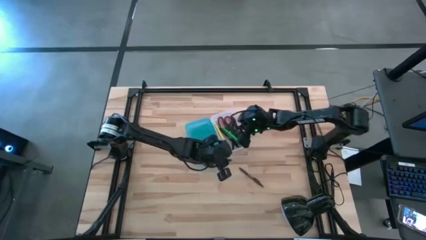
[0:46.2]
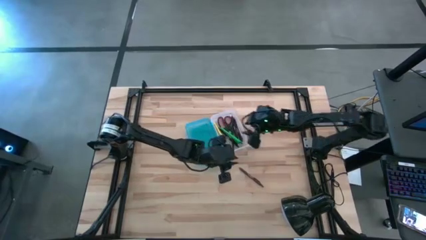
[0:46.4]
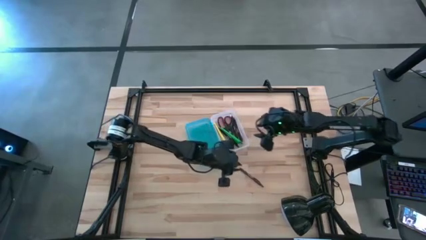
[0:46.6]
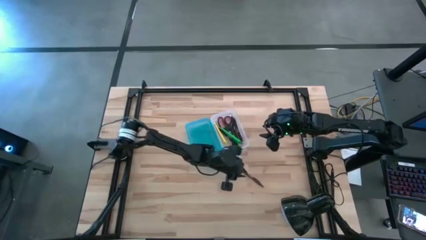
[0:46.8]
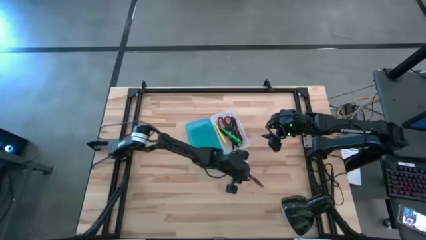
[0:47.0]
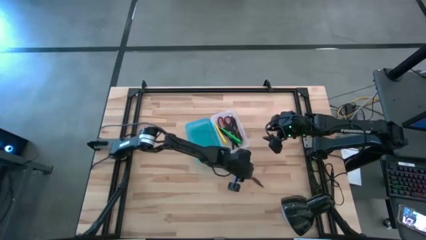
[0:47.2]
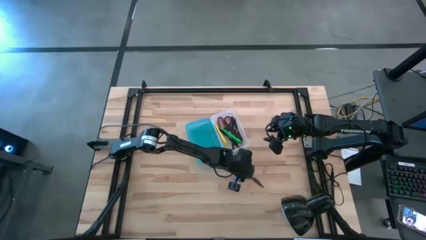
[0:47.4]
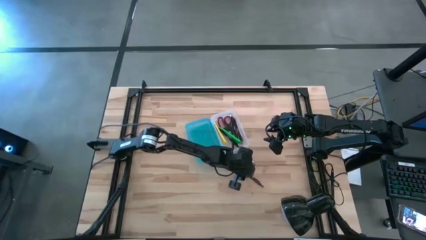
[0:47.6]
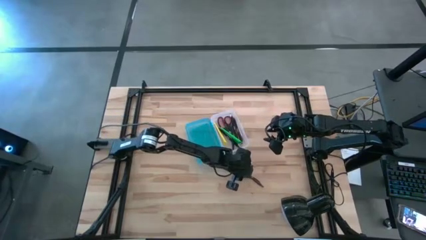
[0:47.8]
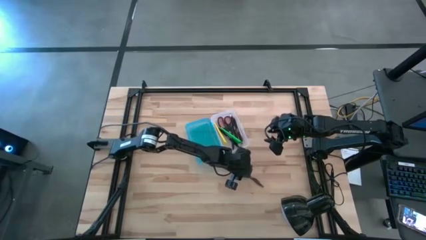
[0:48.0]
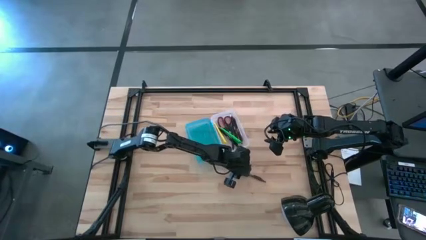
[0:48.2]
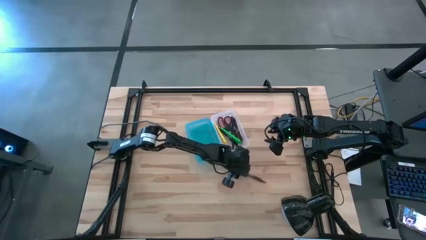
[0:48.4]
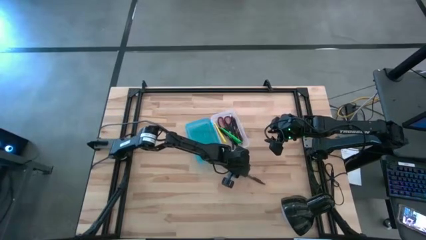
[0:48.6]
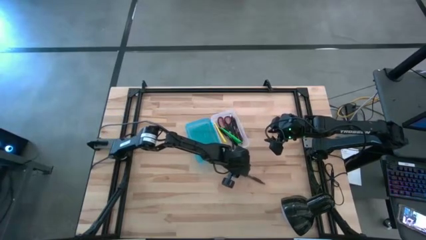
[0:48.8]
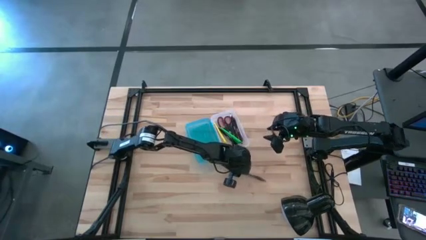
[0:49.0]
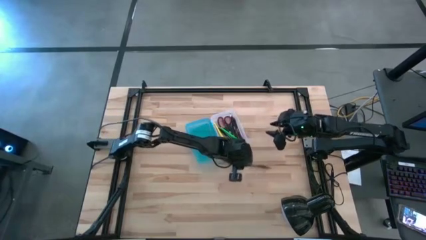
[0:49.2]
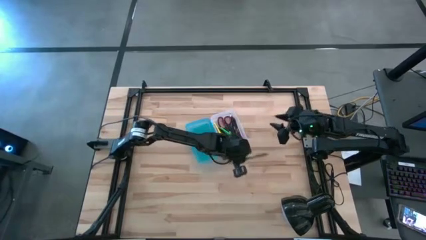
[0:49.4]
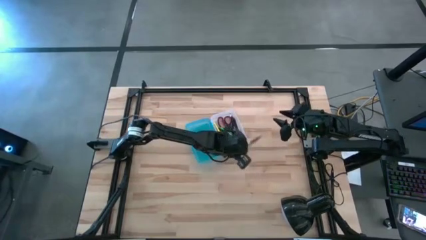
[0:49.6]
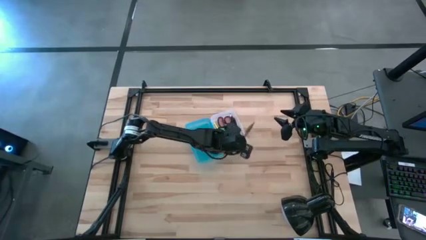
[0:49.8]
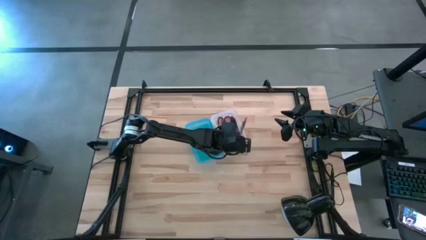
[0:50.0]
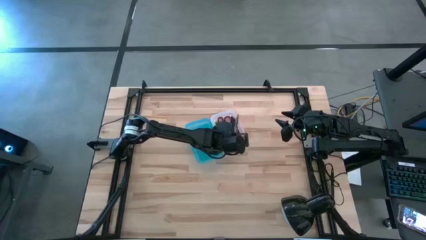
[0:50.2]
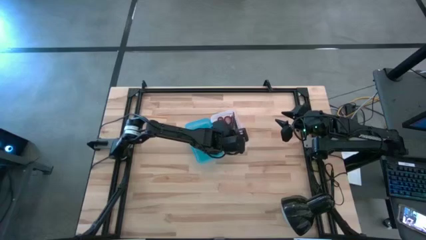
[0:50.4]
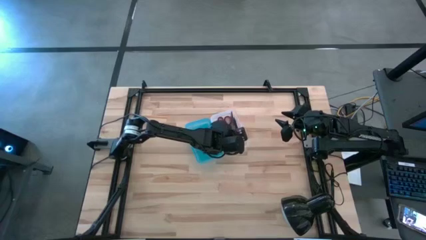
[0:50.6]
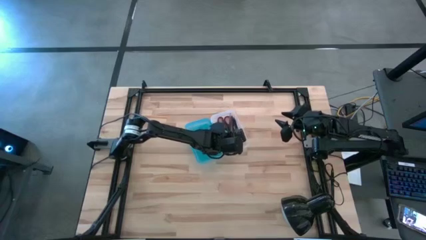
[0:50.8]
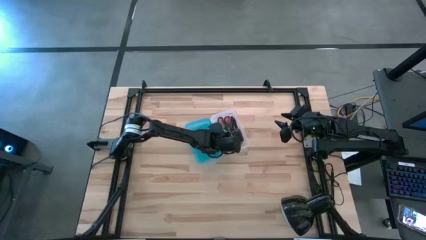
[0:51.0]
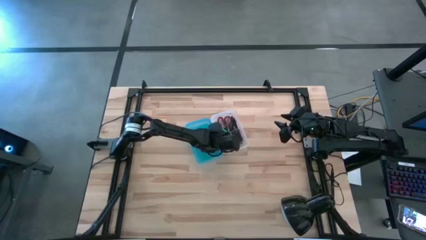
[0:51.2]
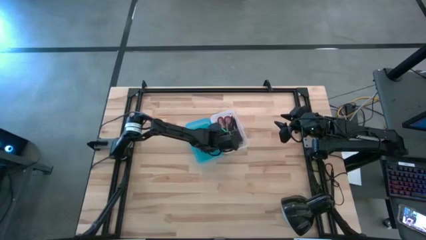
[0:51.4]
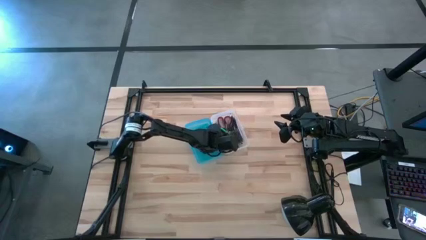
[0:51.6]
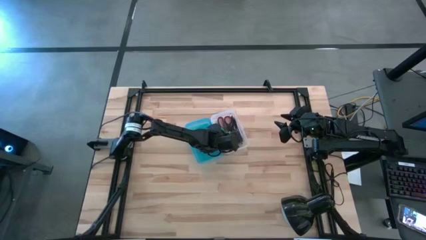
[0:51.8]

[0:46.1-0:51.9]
Task: Pick & place school supplies into a supply box
Put the brown pen into the blue supply box

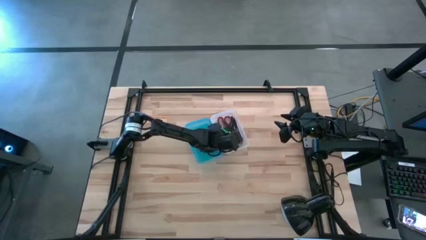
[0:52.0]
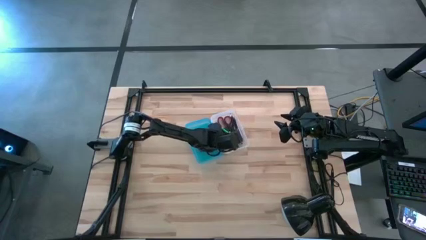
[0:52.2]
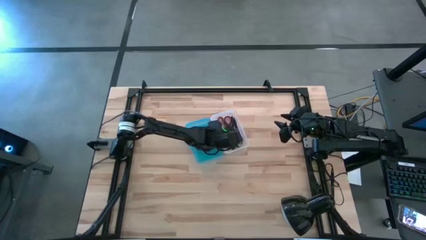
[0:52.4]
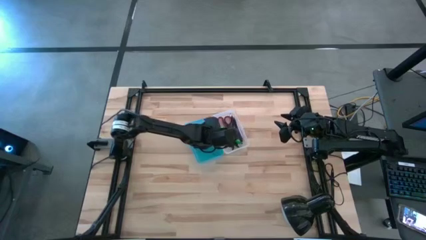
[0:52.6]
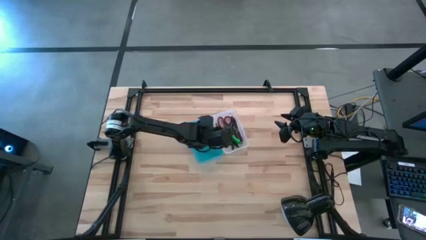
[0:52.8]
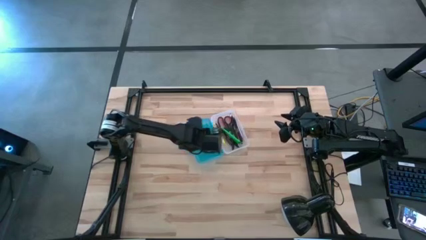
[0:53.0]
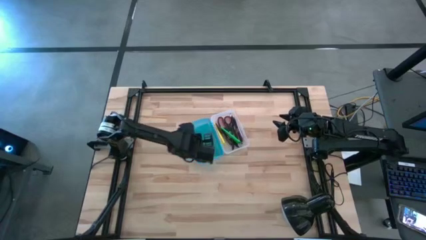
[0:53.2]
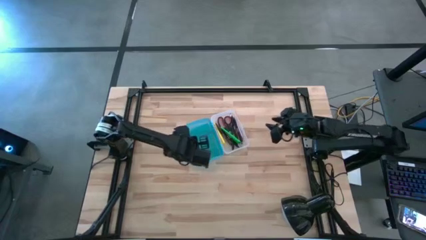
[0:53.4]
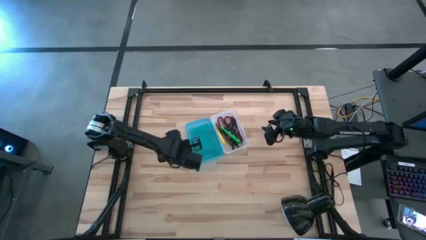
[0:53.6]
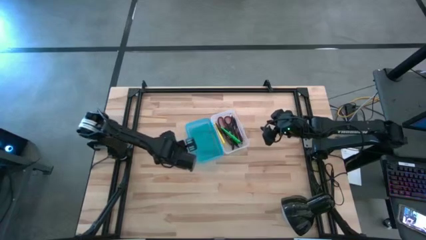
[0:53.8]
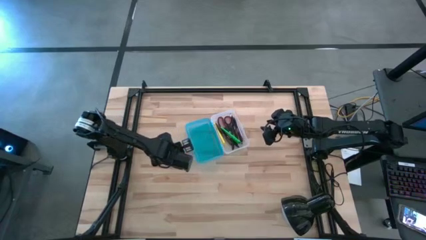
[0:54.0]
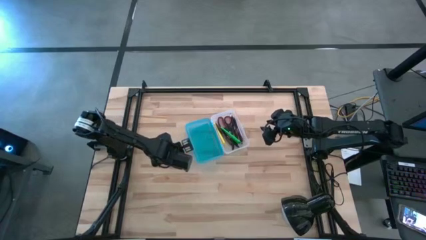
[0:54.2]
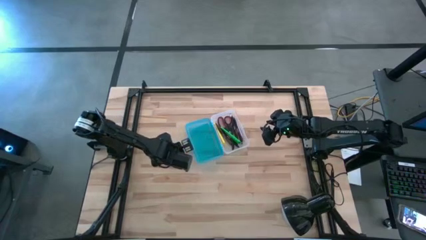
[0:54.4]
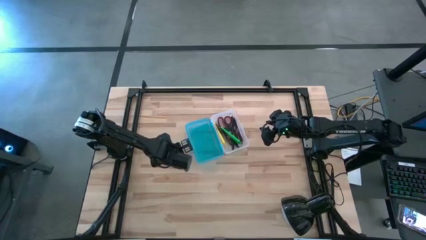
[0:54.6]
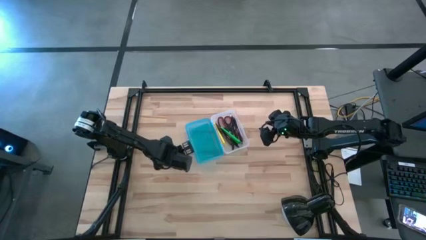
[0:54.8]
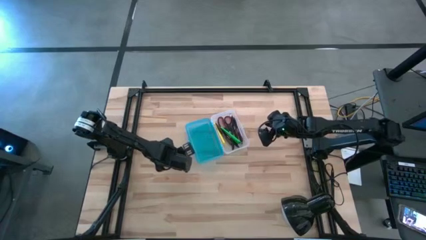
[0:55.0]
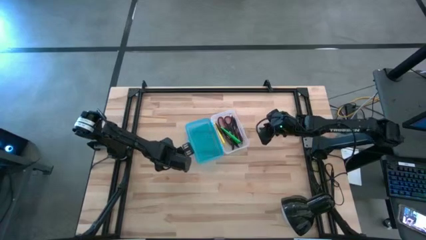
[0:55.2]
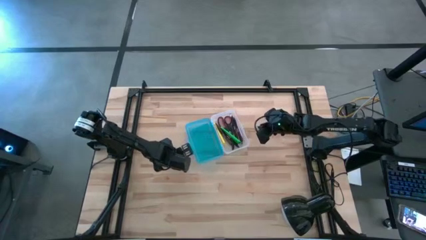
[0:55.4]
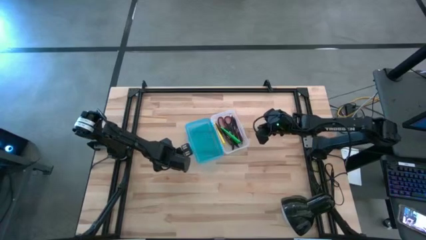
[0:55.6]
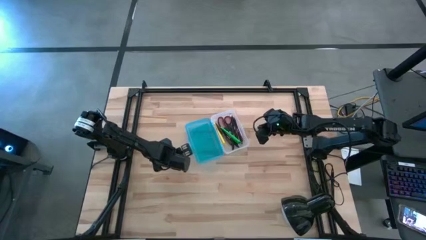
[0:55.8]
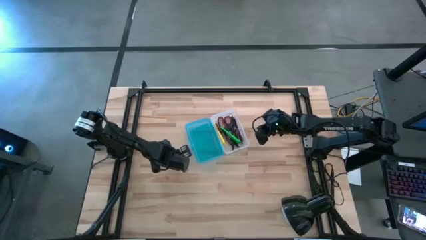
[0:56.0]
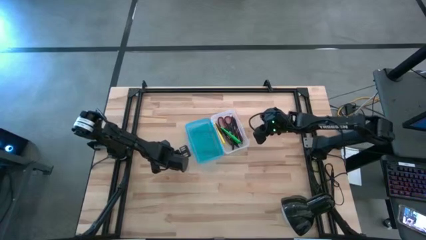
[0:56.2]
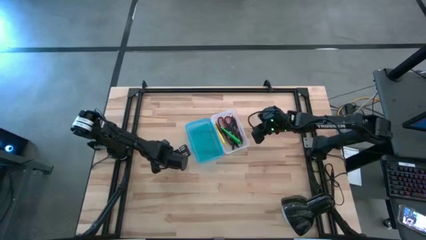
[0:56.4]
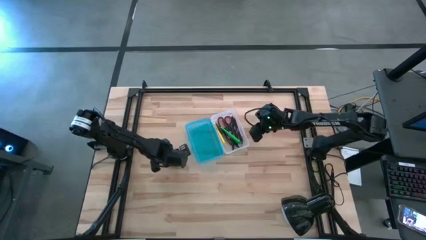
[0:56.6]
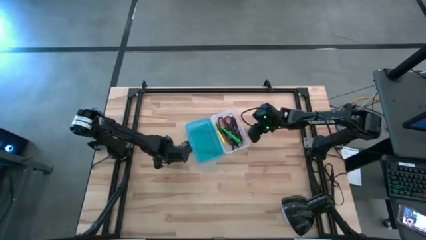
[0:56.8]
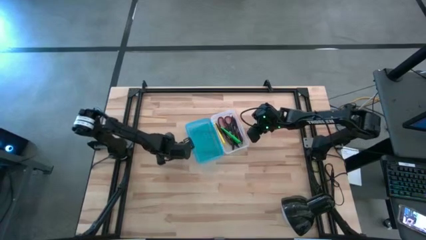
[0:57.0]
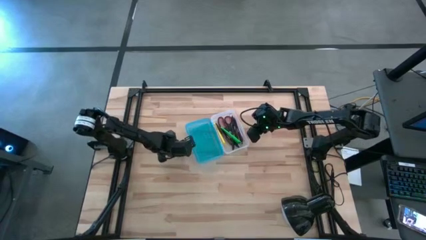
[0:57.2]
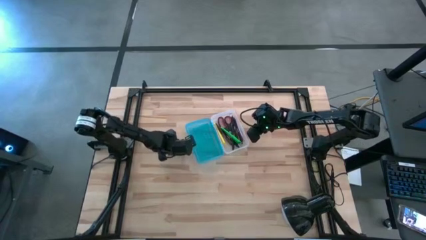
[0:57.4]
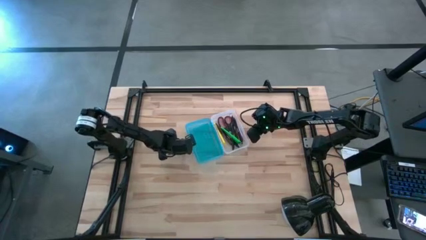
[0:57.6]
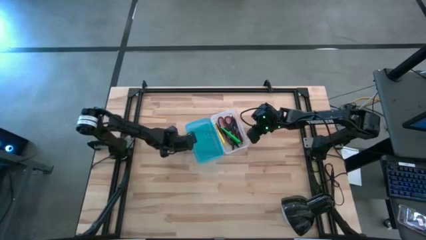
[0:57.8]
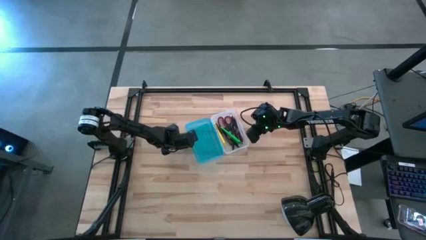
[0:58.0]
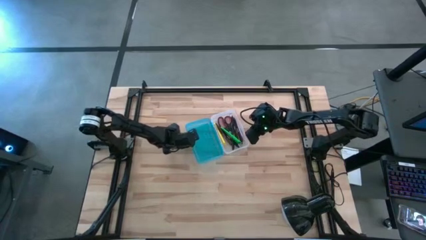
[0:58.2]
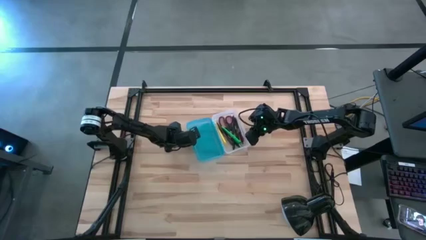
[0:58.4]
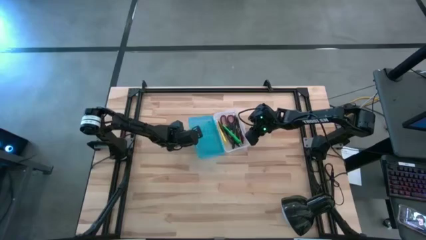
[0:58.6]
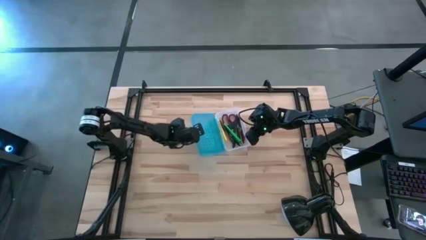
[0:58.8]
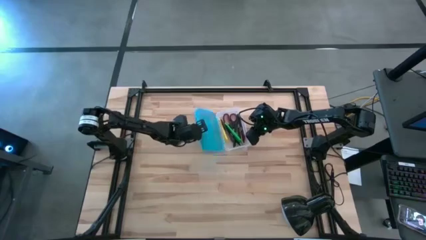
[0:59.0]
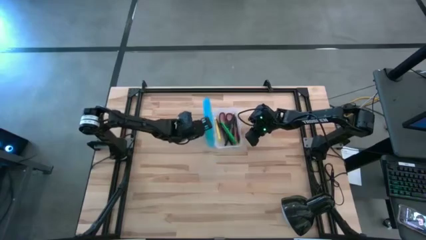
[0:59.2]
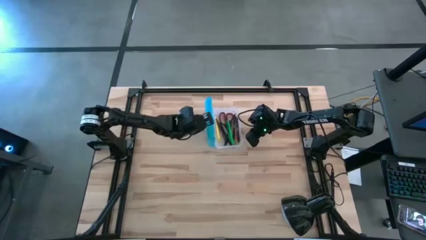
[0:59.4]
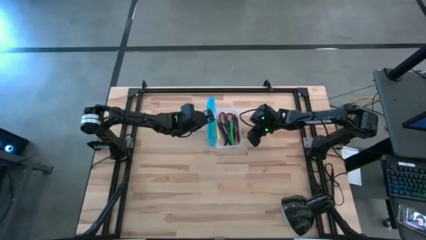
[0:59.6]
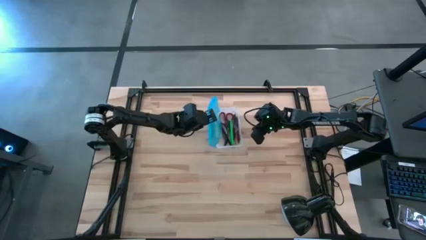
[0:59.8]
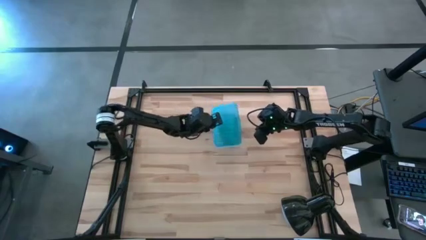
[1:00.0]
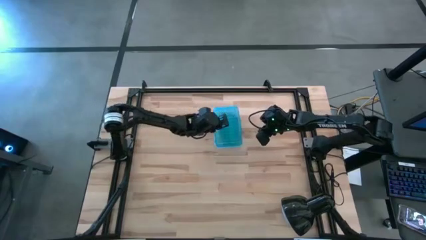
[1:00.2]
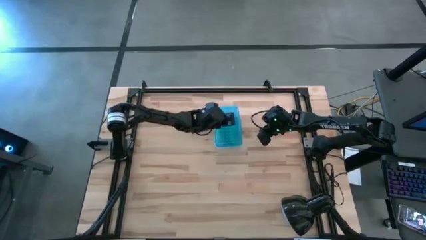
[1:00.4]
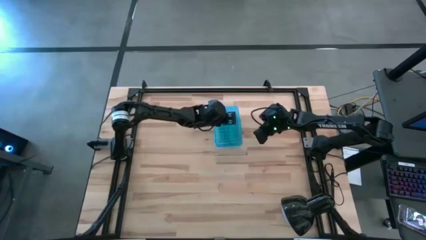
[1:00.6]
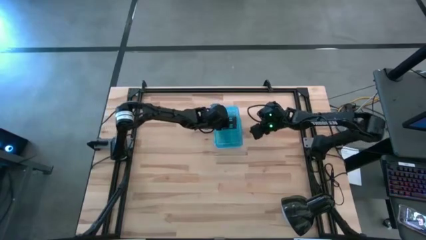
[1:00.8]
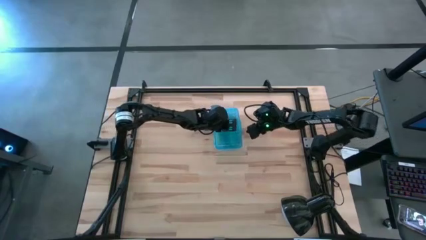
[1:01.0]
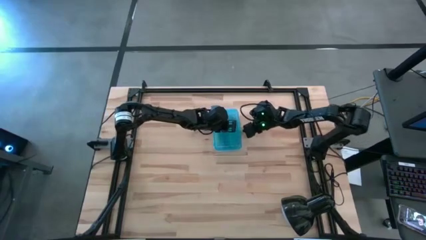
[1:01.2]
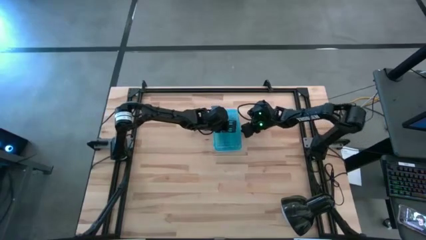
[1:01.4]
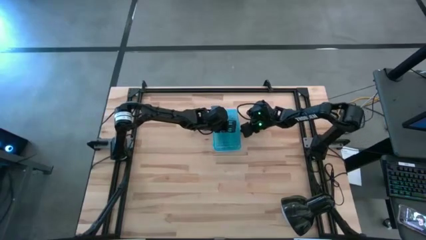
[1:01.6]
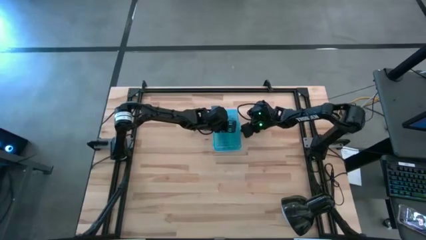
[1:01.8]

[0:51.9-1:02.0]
Close the blue supply box

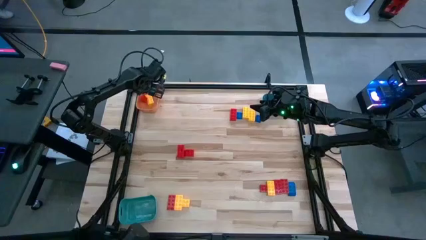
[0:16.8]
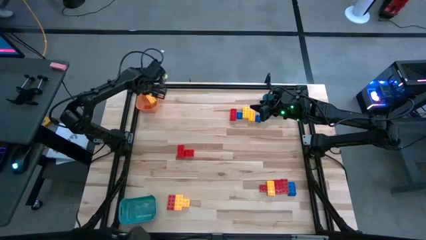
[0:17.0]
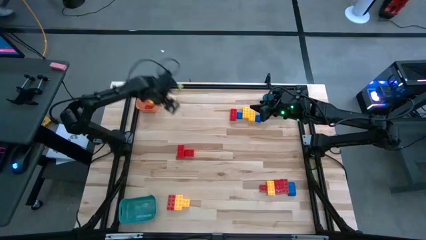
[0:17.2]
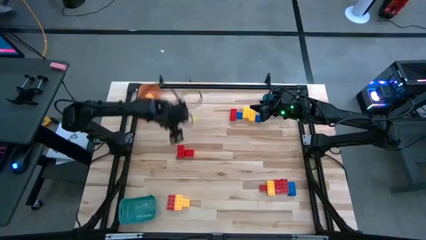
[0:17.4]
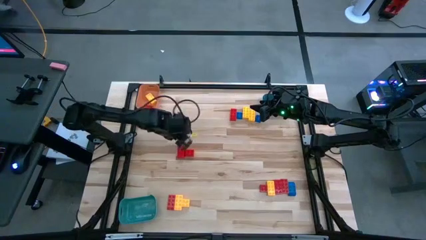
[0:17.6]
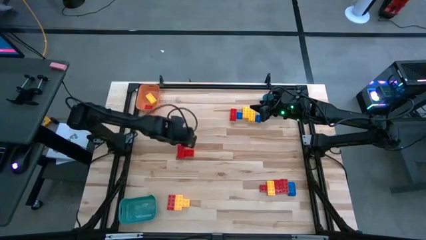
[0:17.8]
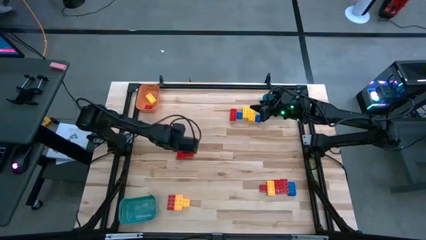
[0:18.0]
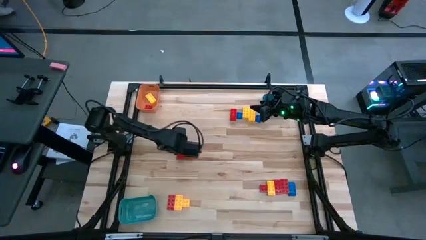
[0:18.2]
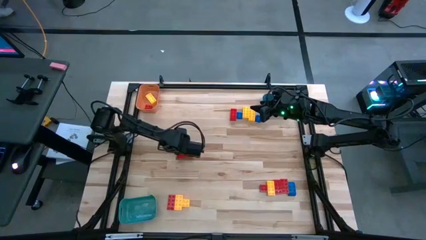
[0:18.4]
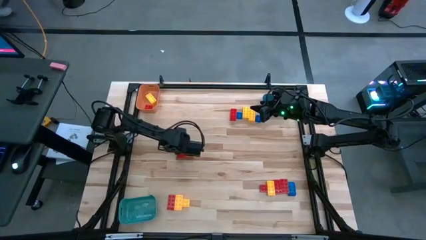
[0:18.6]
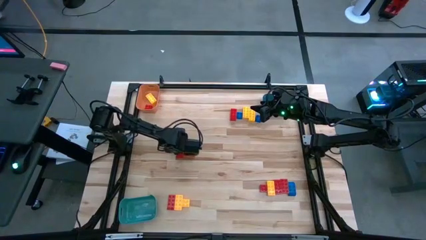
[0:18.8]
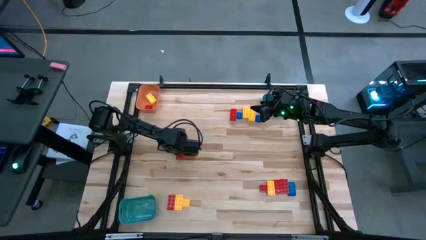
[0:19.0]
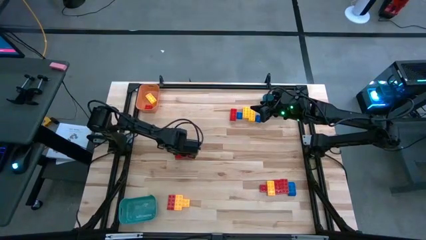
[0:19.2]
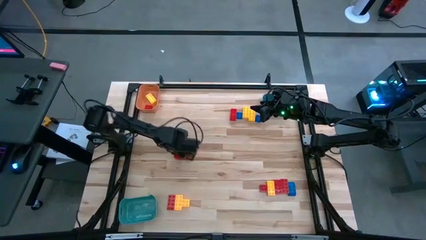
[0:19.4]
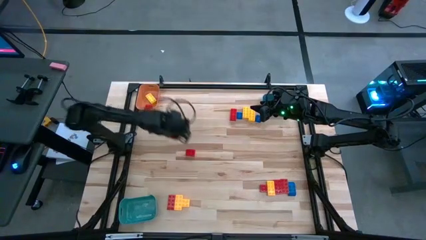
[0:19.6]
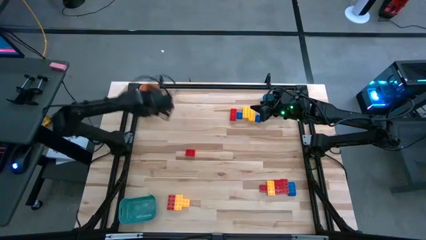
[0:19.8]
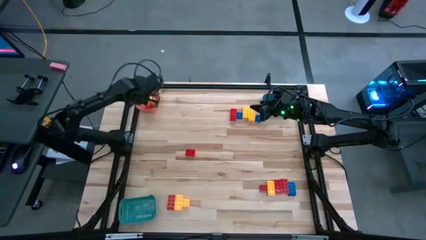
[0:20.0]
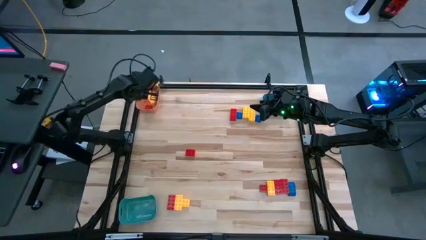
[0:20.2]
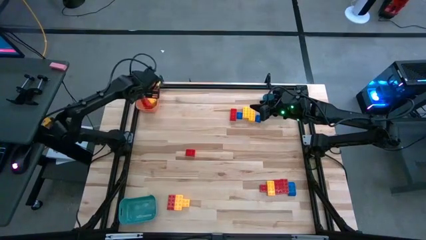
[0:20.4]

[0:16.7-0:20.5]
Task: Sort blocks
Put the red game piece into the orange bin
